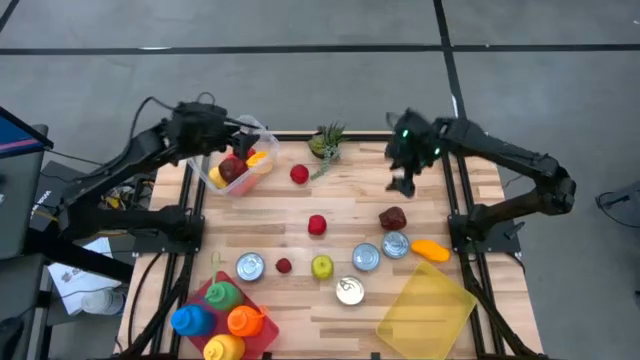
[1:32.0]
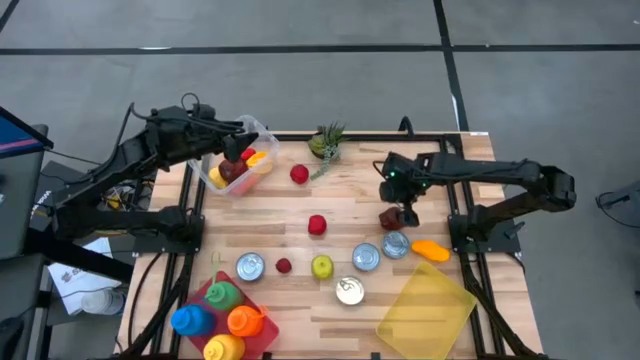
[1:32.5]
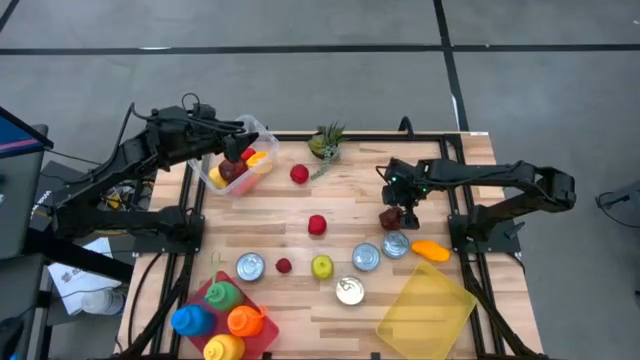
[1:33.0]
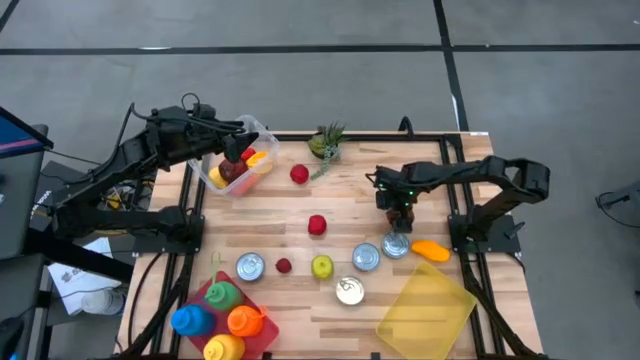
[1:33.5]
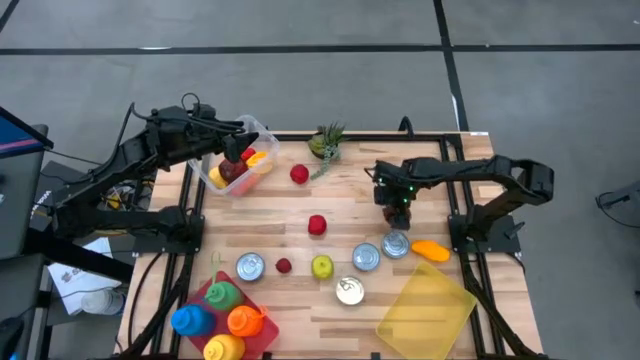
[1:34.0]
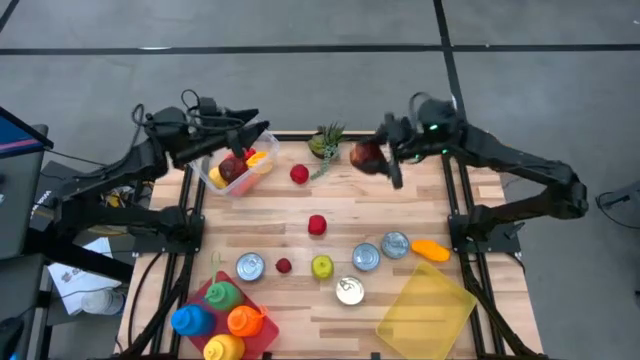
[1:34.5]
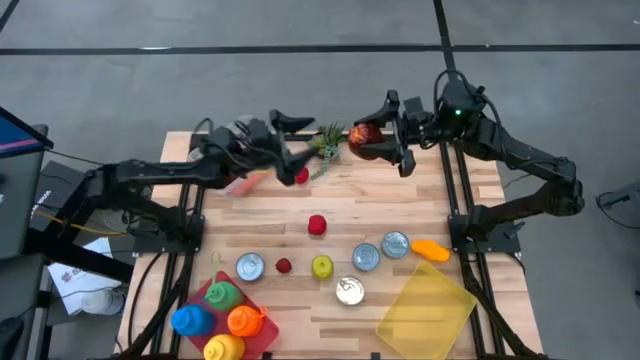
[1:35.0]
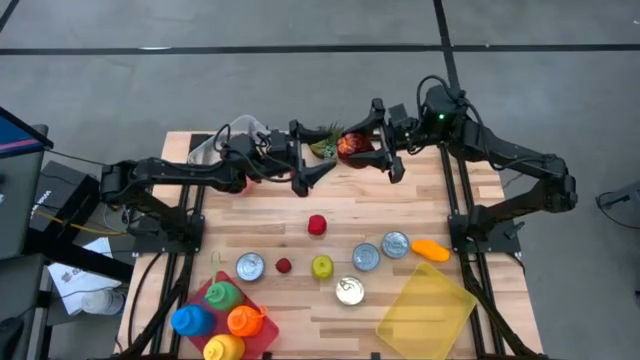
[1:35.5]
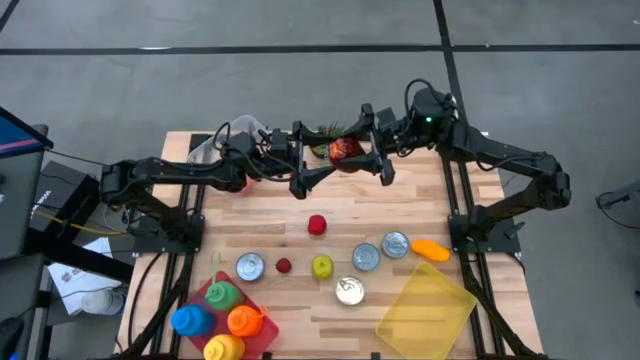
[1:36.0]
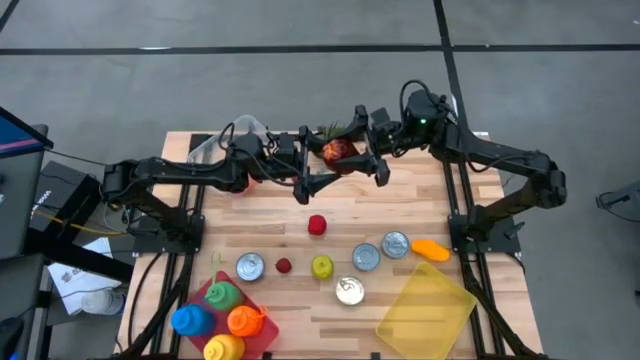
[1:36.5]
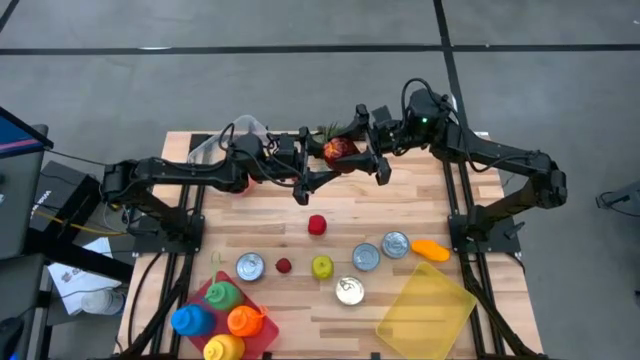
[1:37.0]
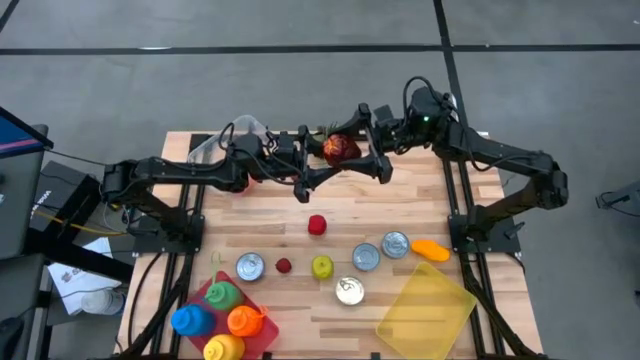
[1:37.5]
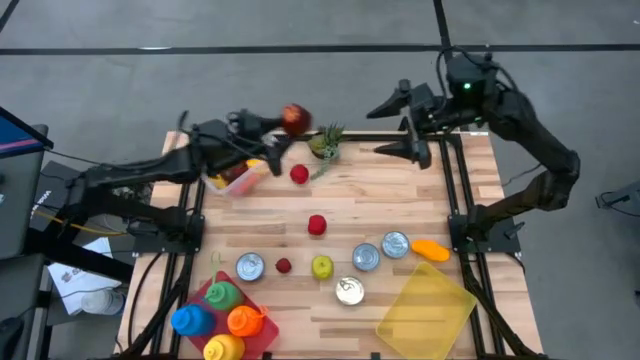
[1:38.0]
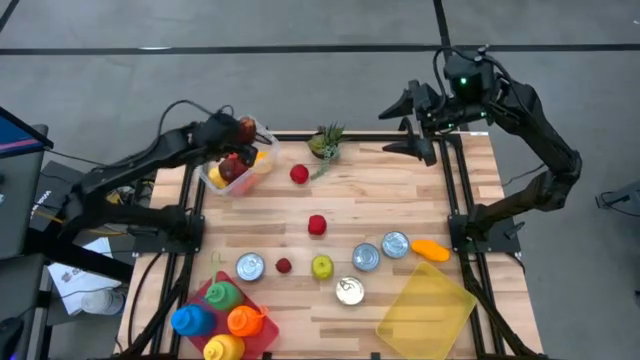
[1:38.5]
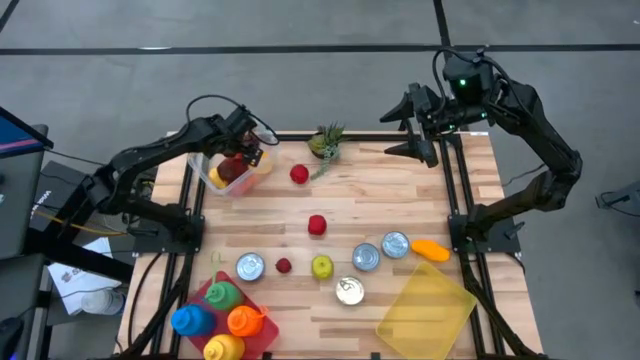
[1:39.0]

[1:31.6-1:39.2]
Task: Pick & Place Food Item
Put the red apple into the transparent bin

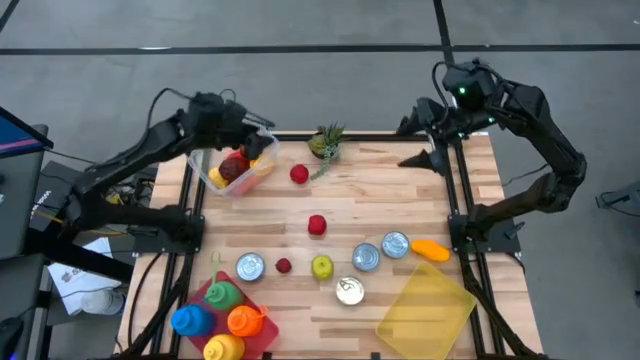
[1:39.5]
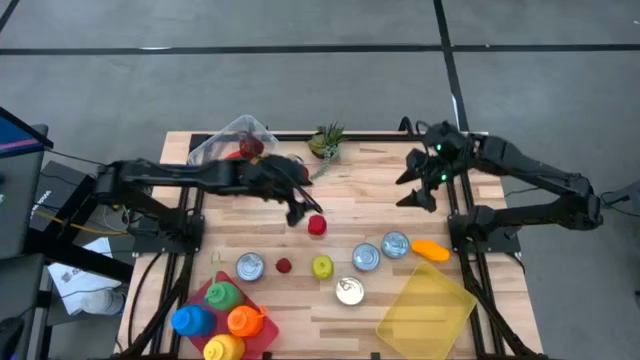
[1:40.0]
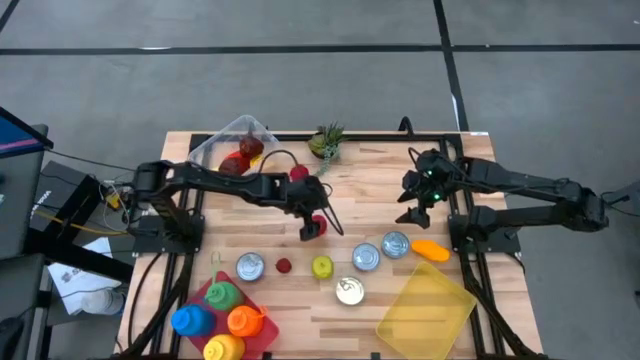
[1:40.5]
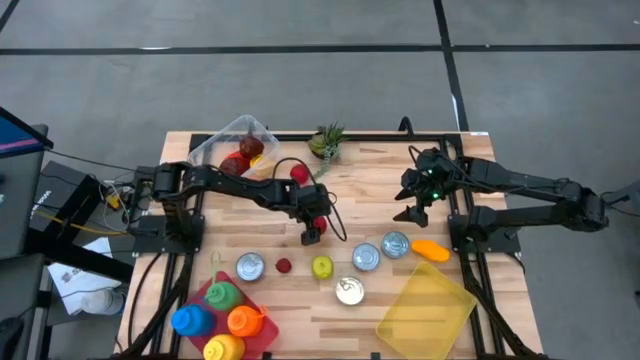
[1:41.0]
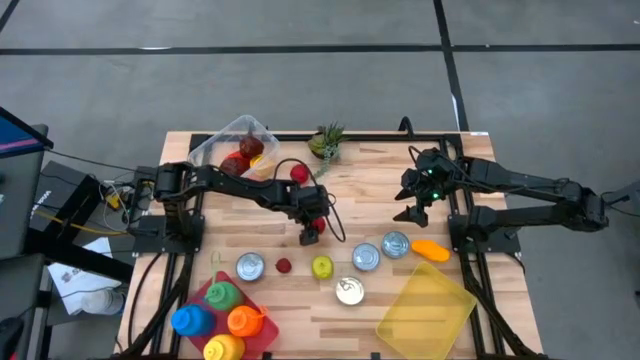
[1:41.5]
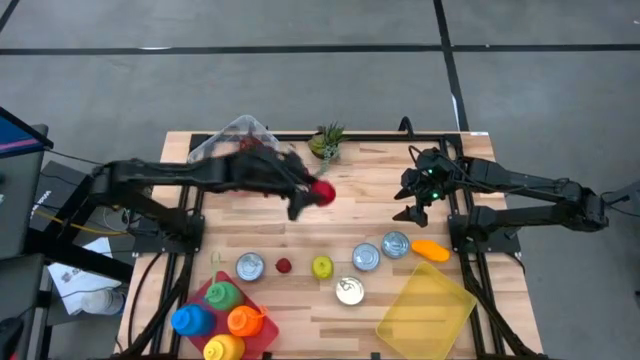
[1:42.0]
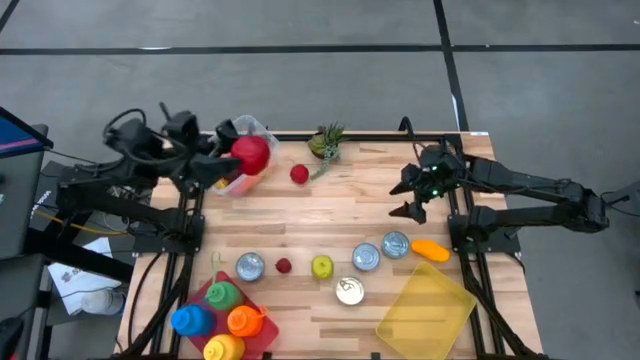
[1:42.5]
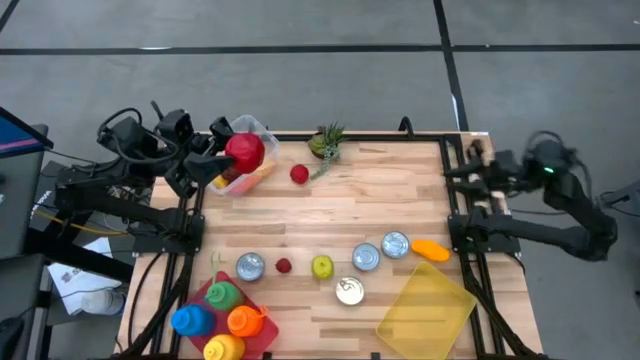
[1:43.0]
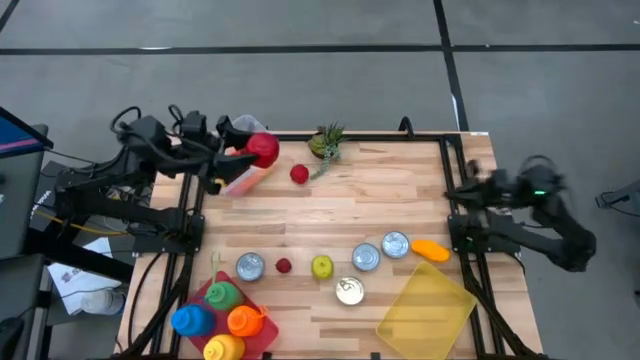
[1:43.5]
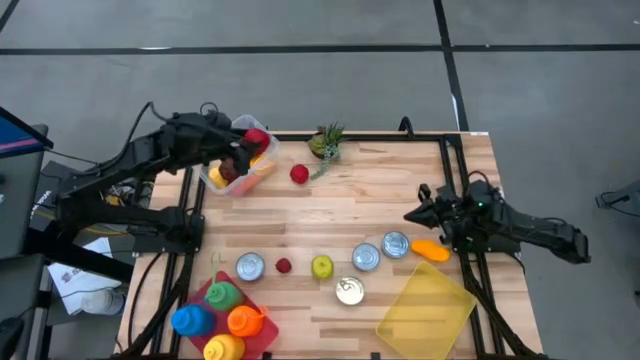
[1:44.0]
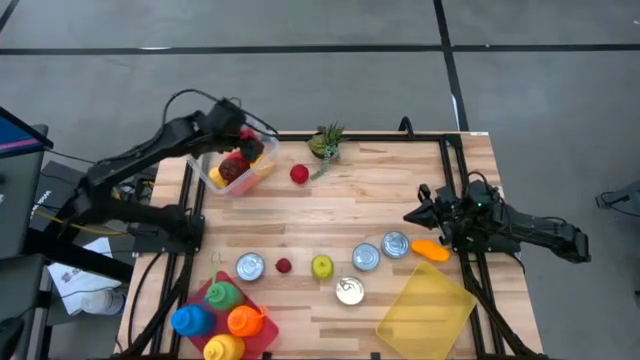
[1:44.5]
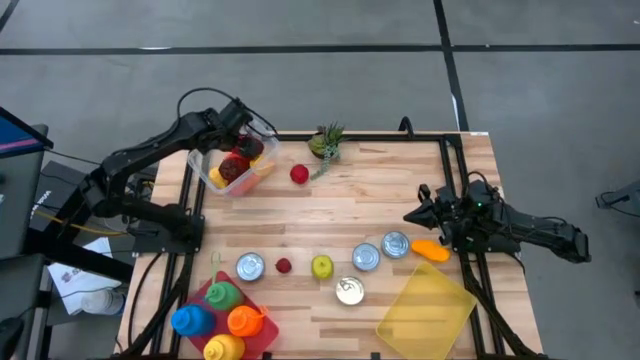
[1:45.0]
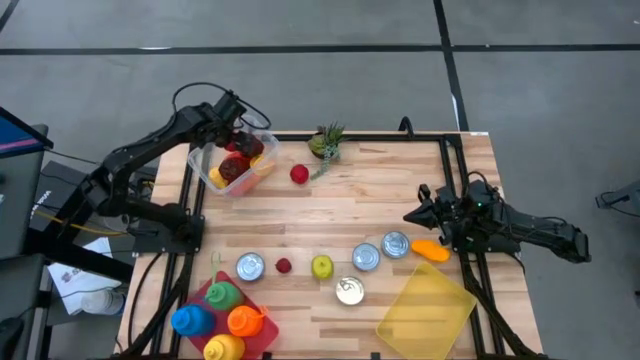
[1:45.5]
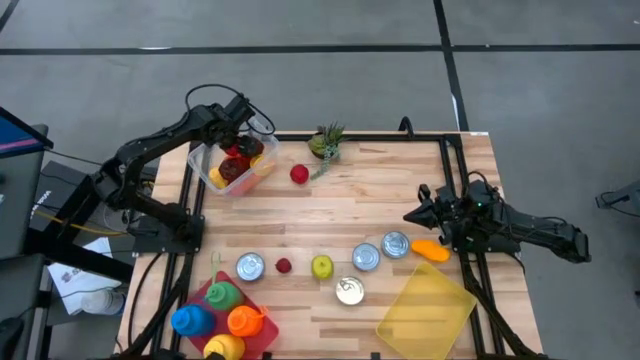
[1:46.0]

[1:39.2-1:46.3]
Put the bottom red apple into the transparent bin

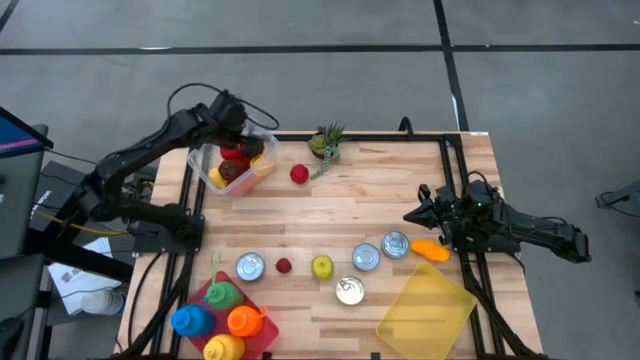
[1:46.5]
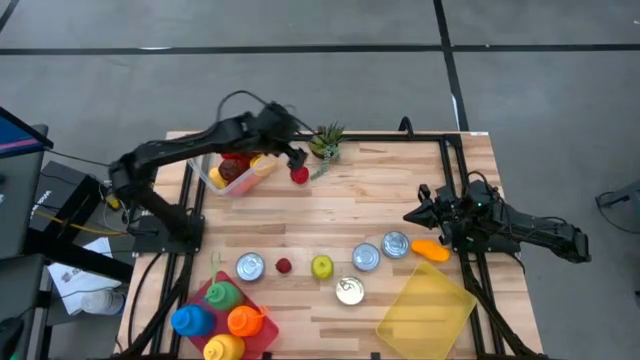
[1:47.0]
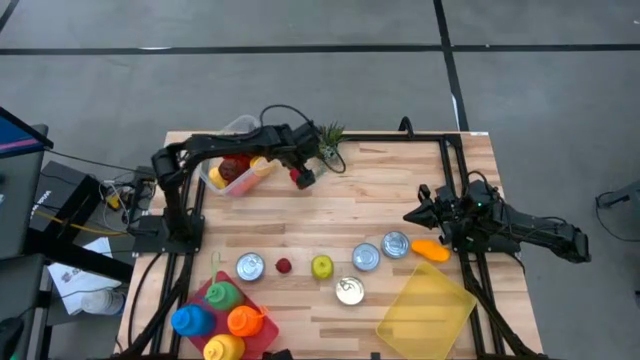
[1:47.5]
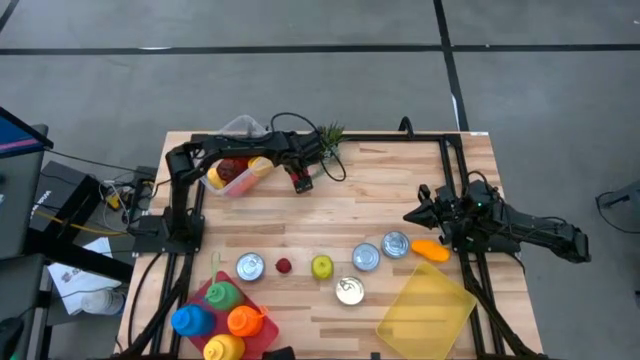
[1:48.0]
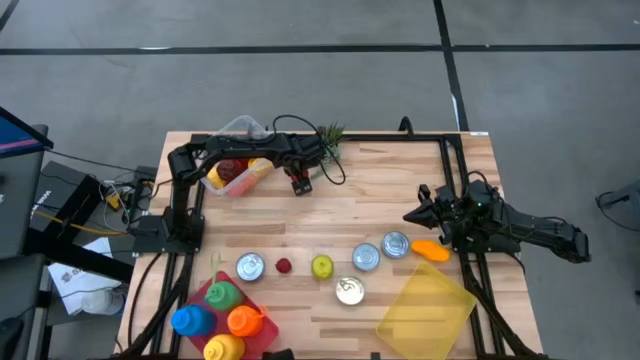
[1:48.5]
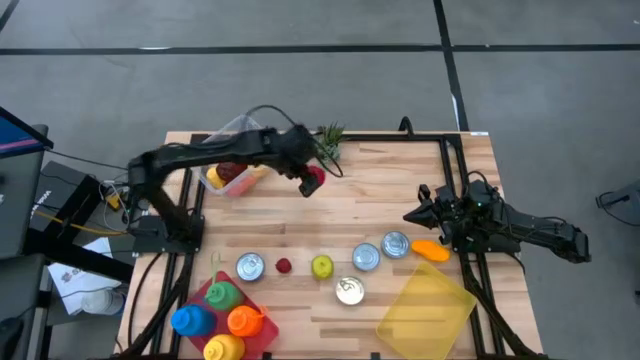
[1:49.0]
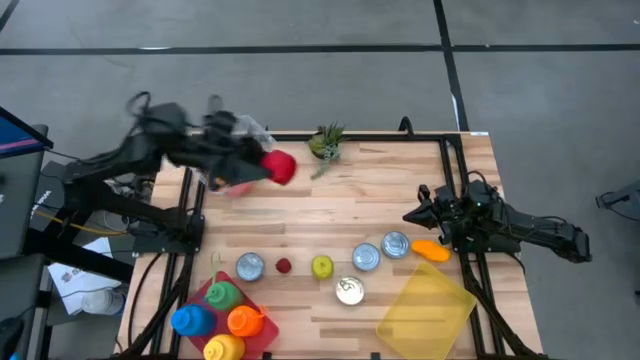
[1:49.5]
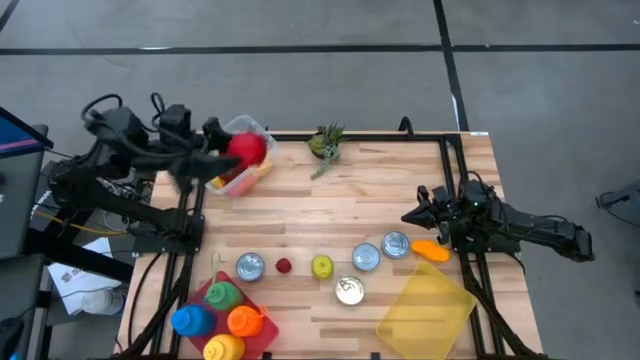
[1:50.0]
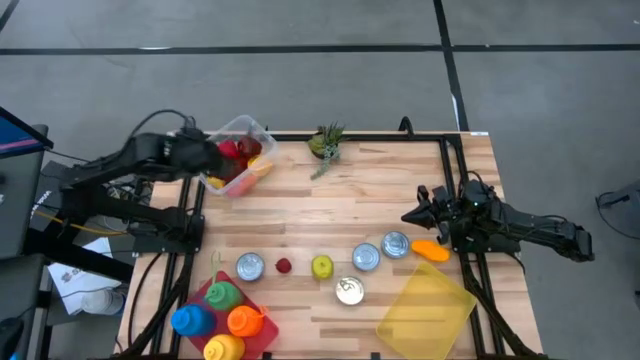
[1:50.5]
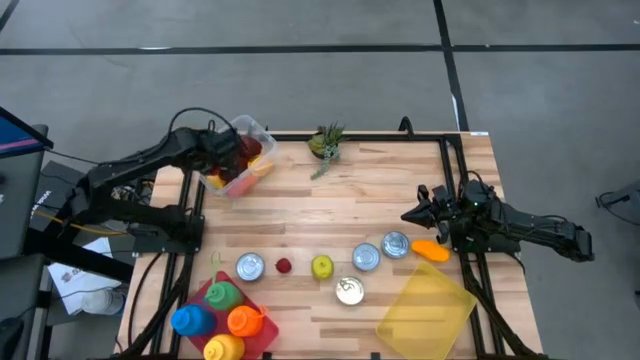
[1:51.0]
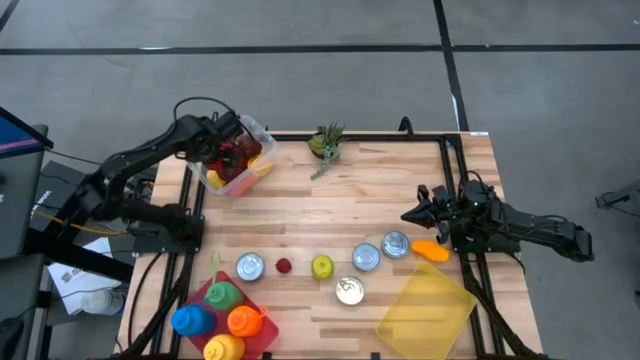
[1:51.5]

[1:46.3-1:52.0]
Put the red apple into the transparent bin

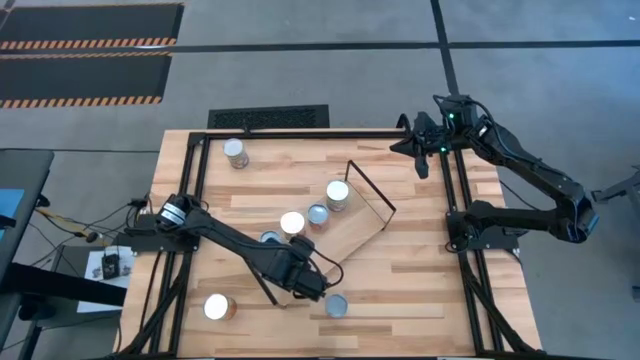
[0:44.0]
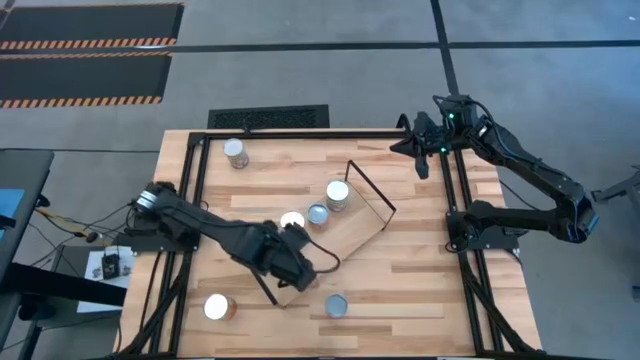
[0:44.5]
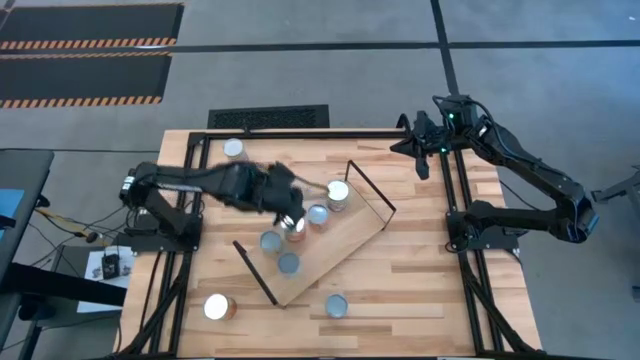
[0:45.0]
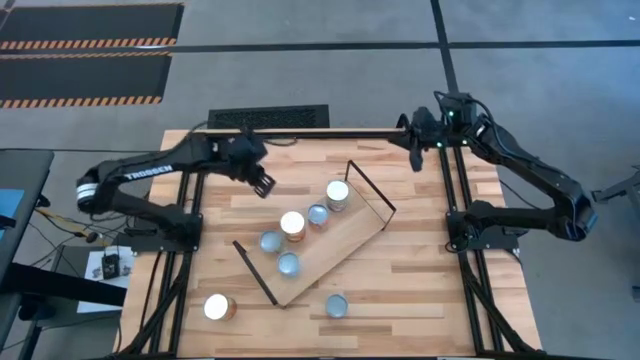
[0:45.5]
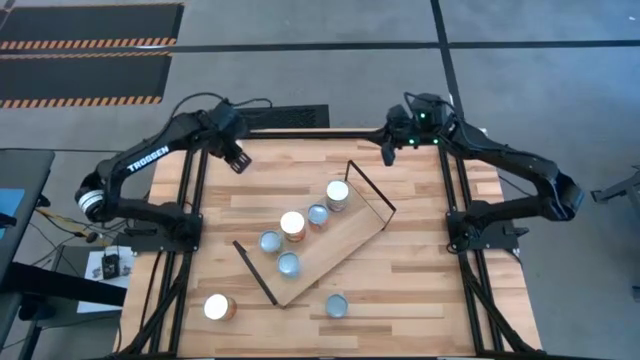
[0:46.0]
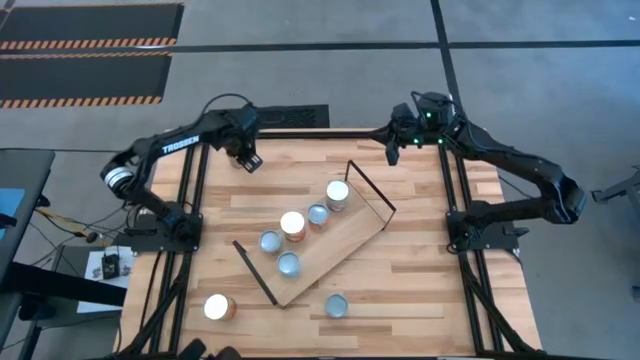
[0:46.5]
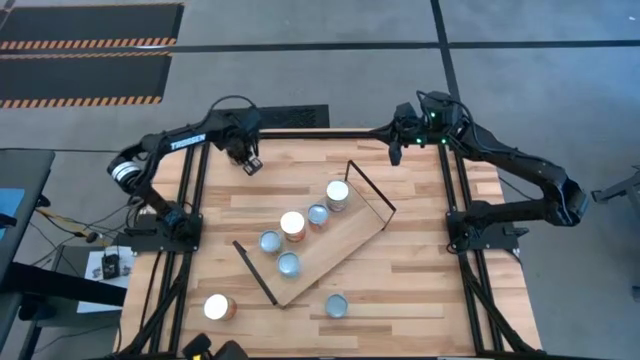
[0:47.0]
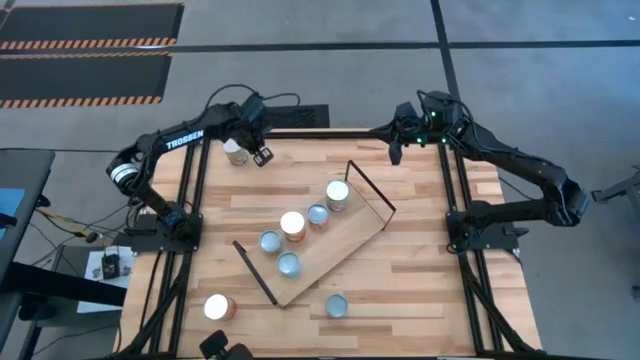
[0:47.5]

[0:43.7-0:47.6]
Task: Pick and place cans onto a shelf
Put the canned peaches on the shelf aligned with the other canned peaches
